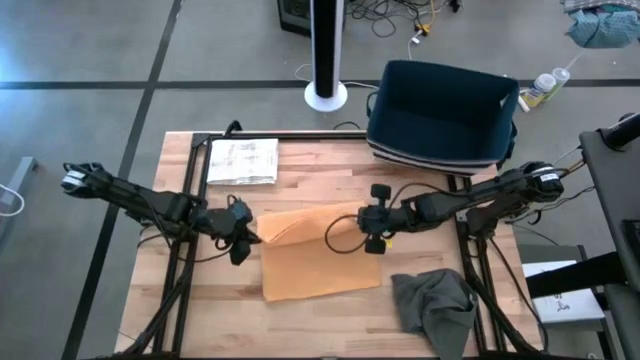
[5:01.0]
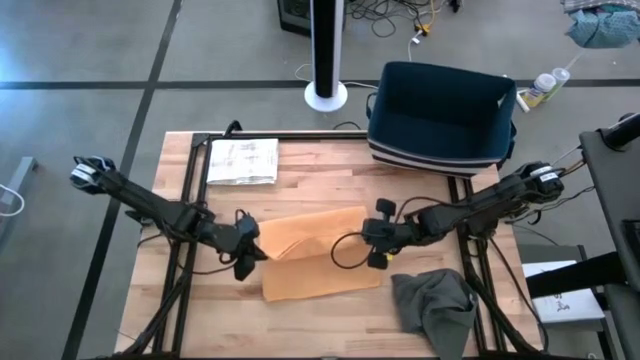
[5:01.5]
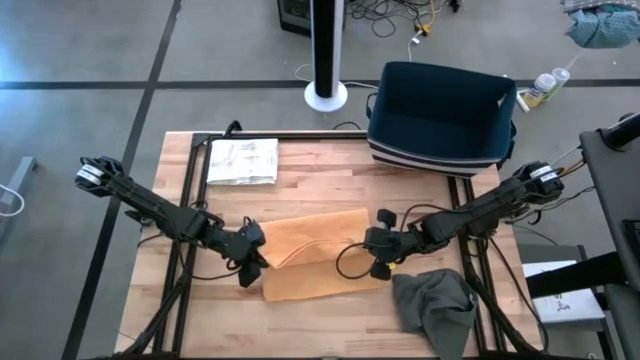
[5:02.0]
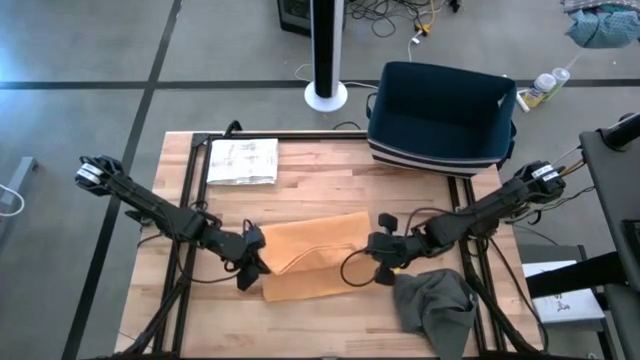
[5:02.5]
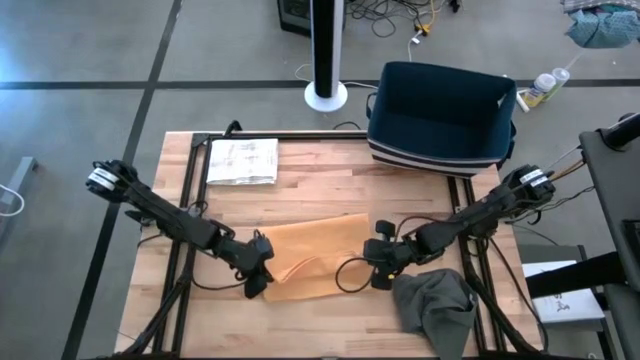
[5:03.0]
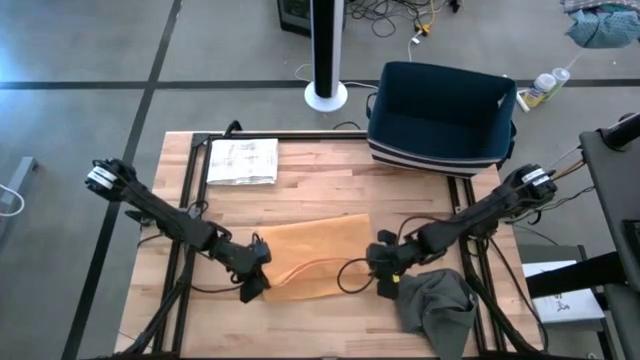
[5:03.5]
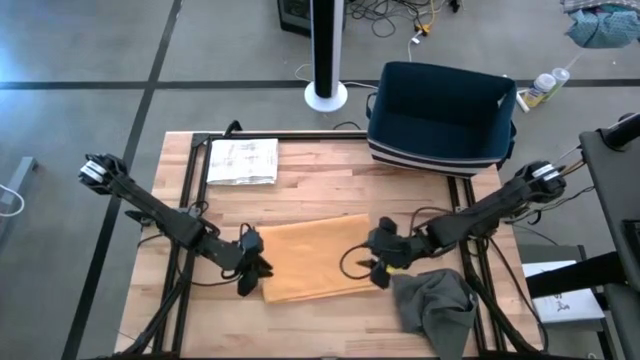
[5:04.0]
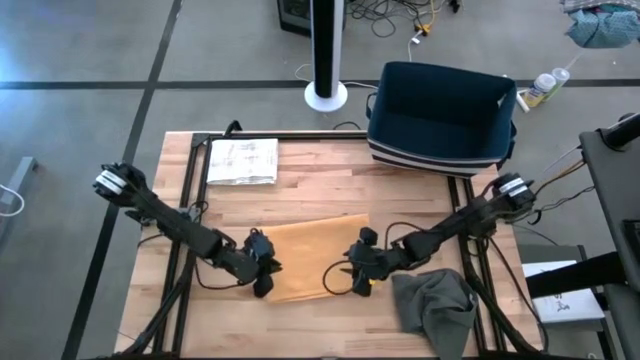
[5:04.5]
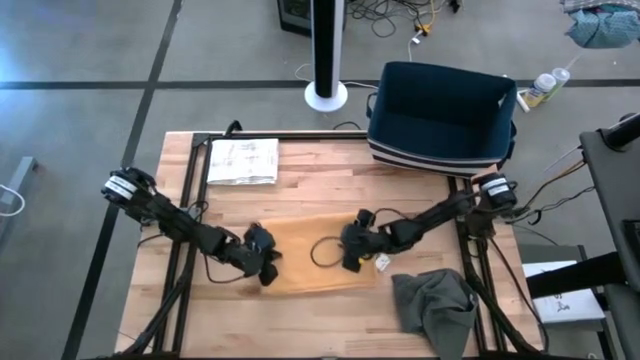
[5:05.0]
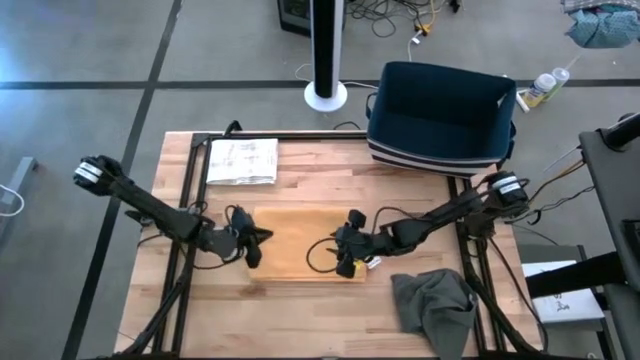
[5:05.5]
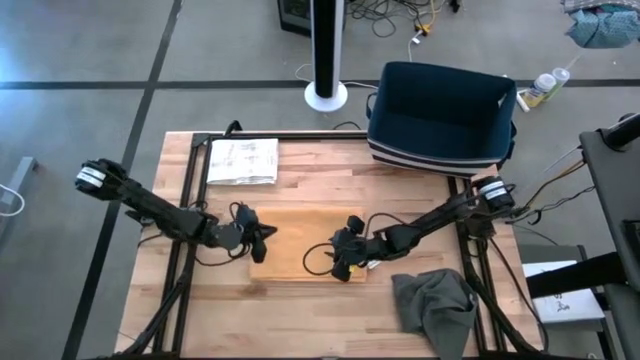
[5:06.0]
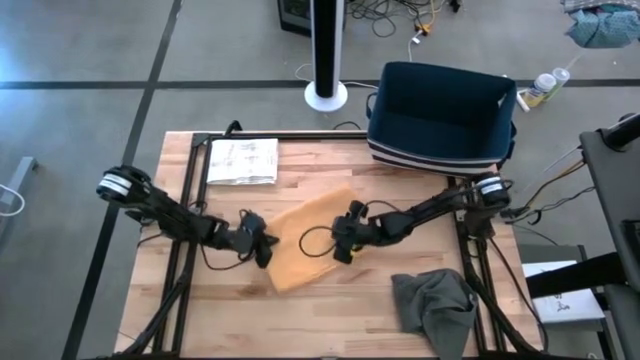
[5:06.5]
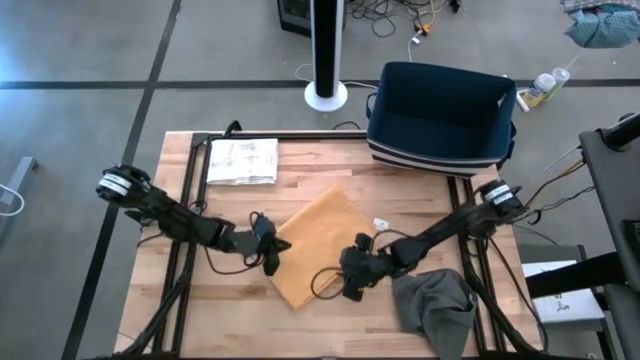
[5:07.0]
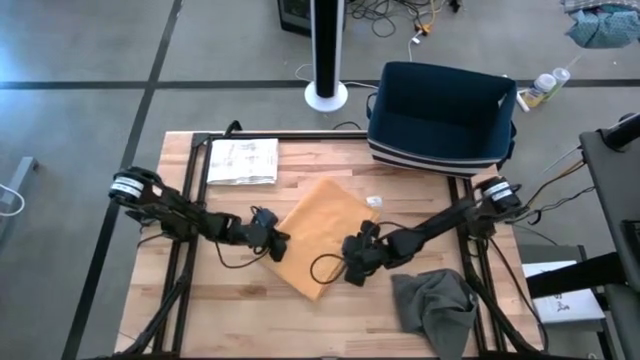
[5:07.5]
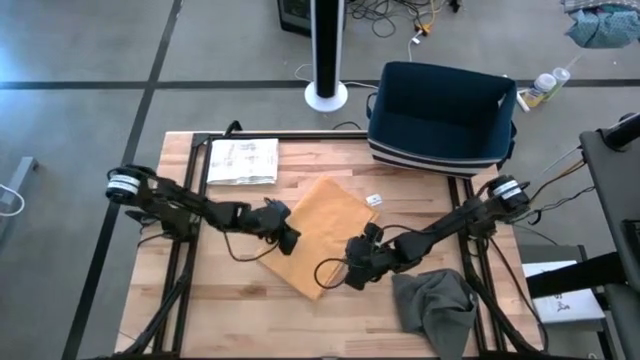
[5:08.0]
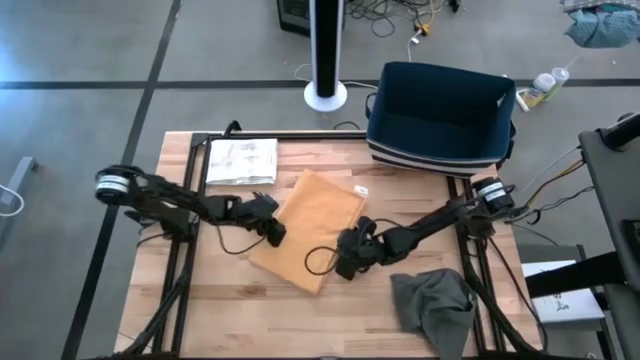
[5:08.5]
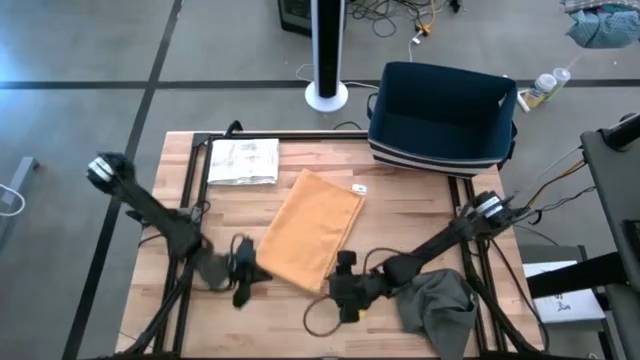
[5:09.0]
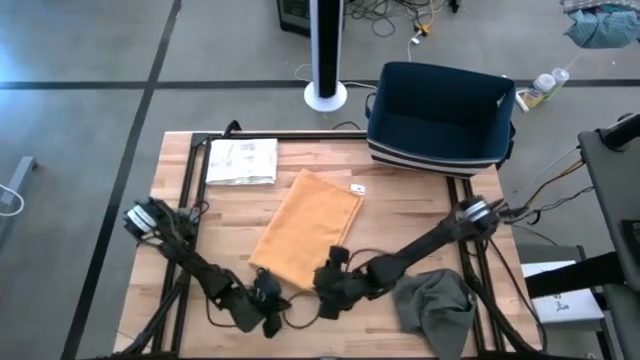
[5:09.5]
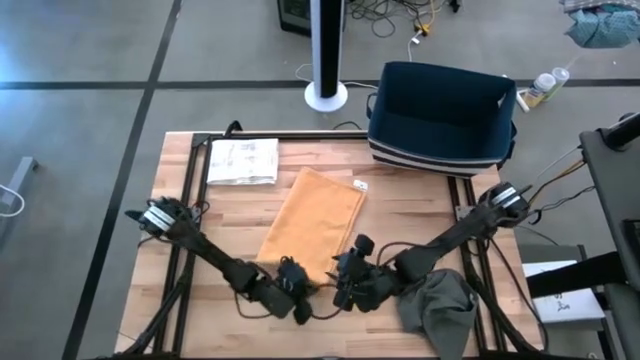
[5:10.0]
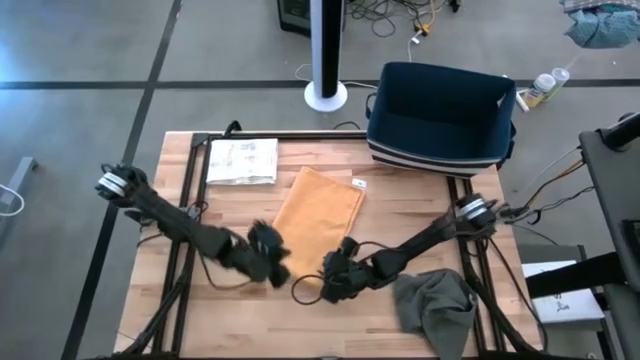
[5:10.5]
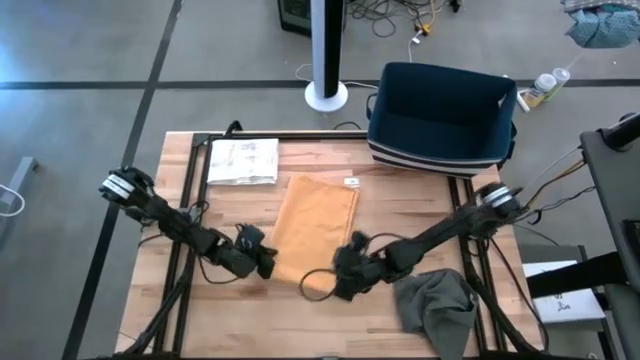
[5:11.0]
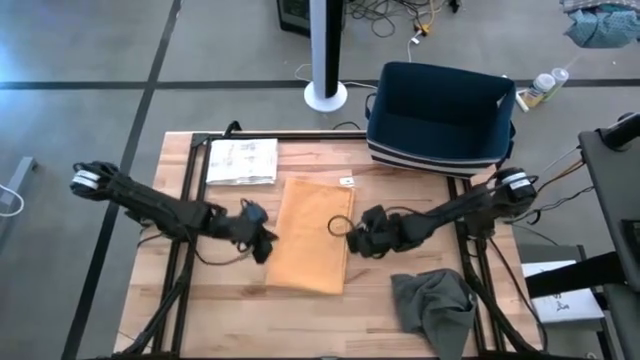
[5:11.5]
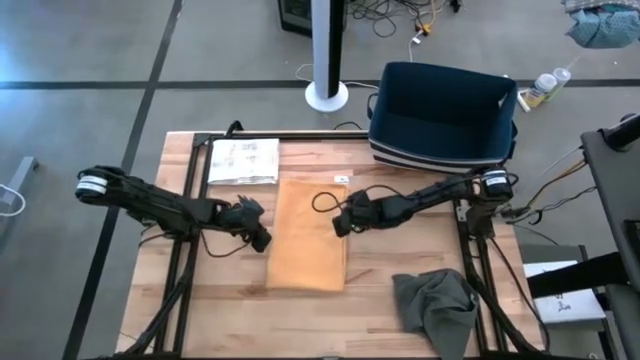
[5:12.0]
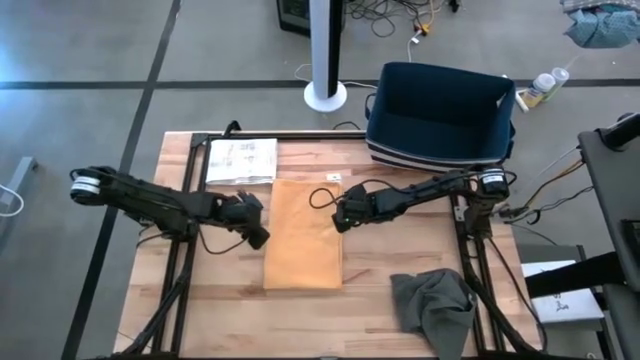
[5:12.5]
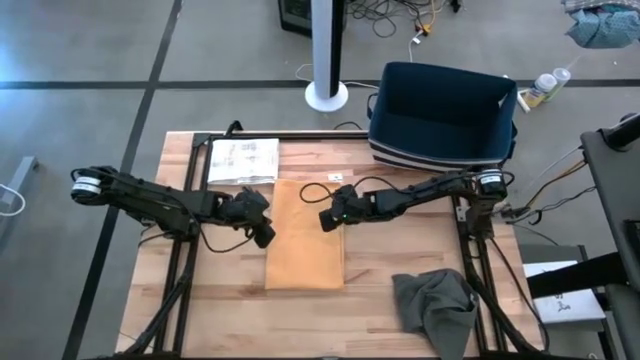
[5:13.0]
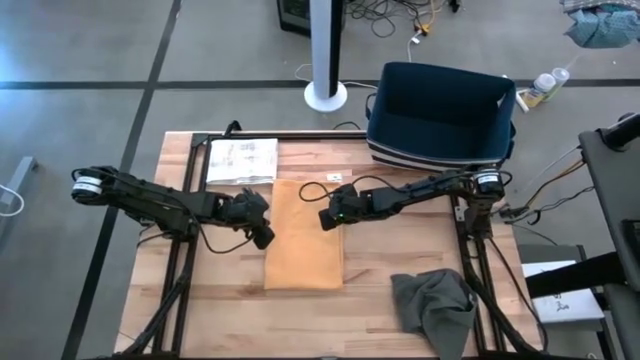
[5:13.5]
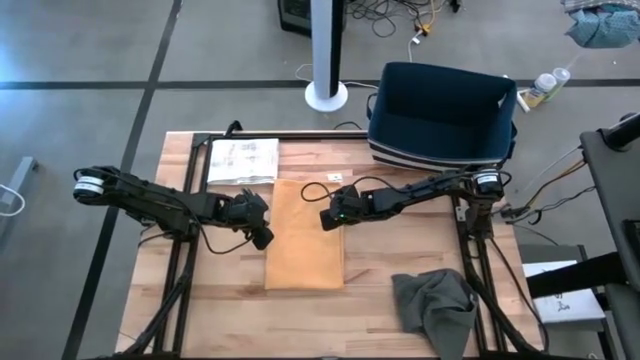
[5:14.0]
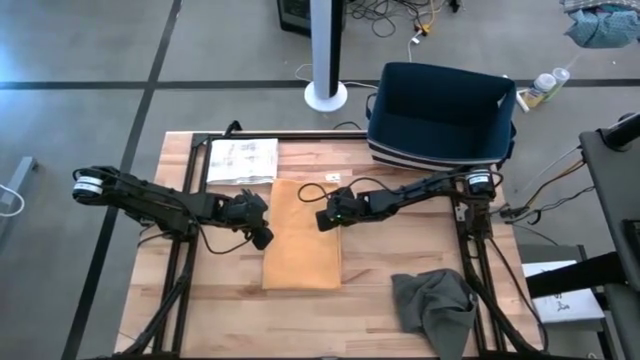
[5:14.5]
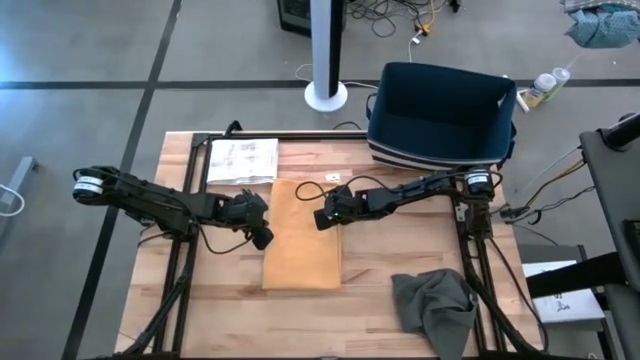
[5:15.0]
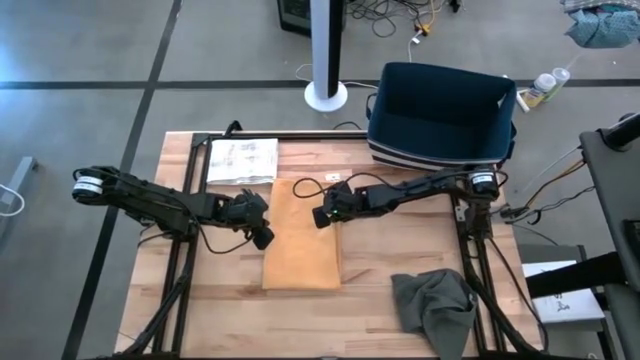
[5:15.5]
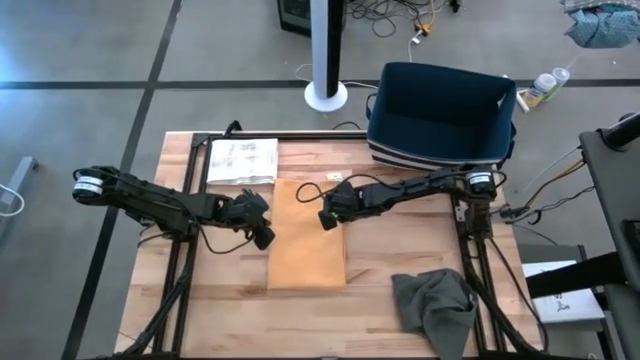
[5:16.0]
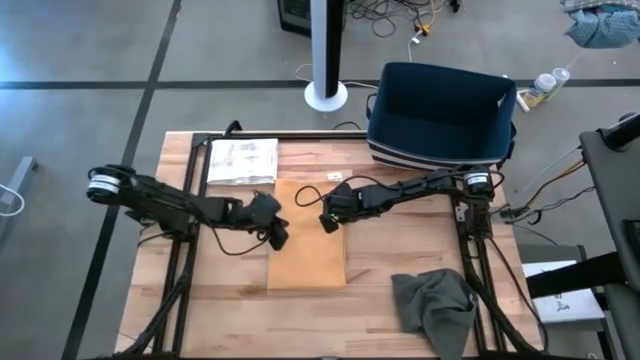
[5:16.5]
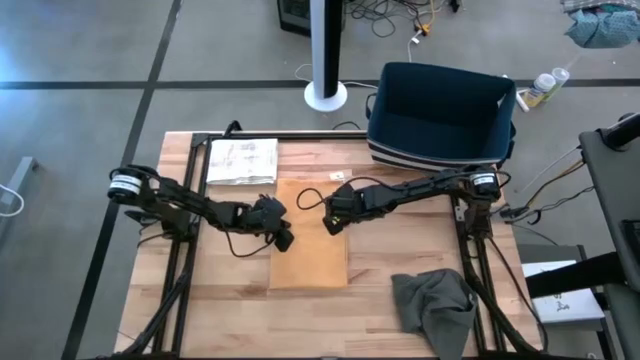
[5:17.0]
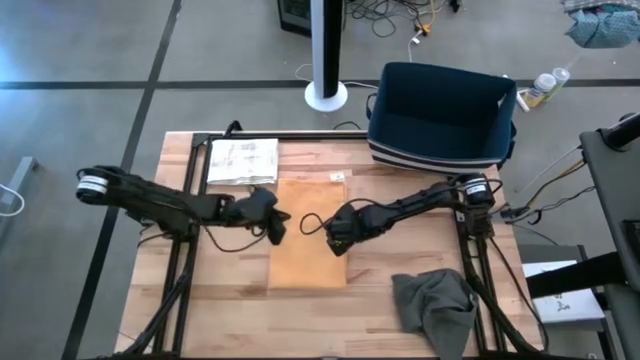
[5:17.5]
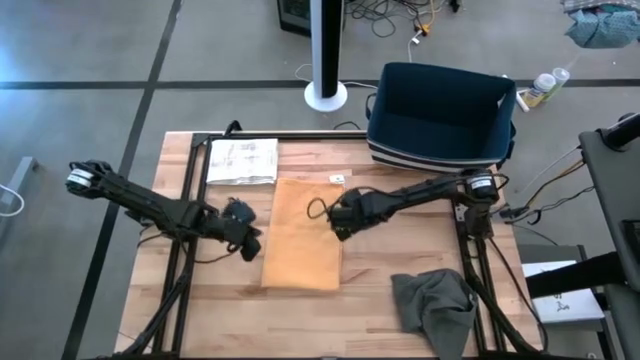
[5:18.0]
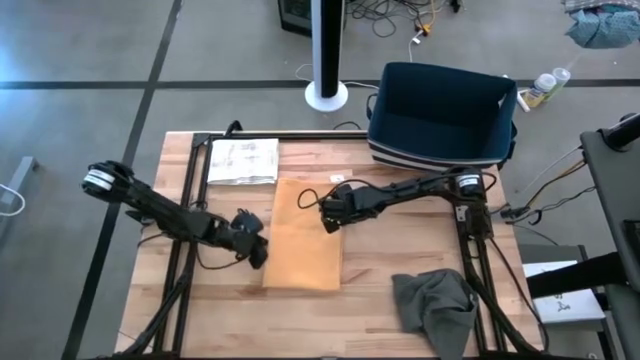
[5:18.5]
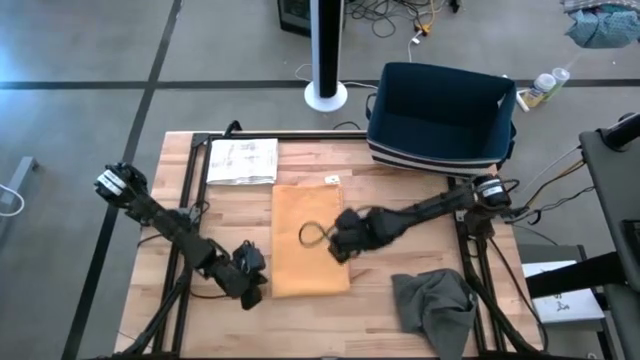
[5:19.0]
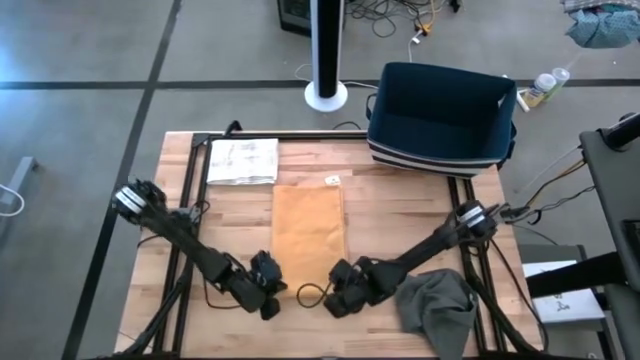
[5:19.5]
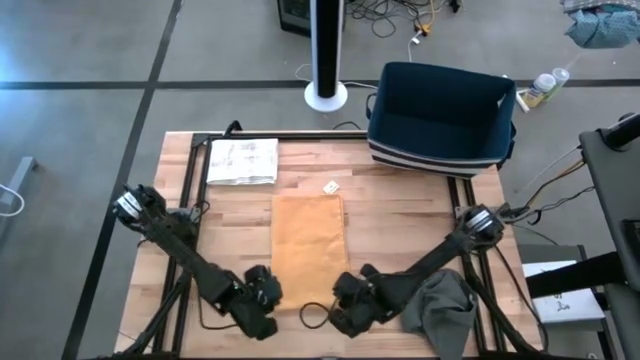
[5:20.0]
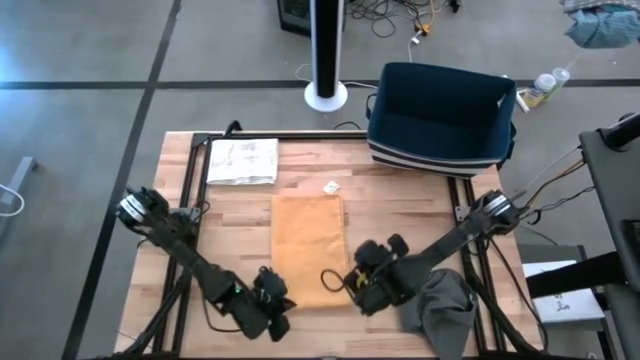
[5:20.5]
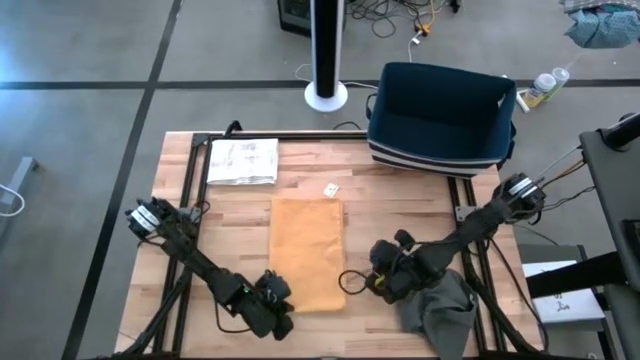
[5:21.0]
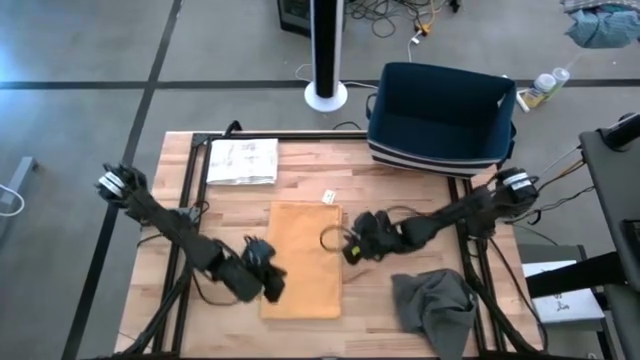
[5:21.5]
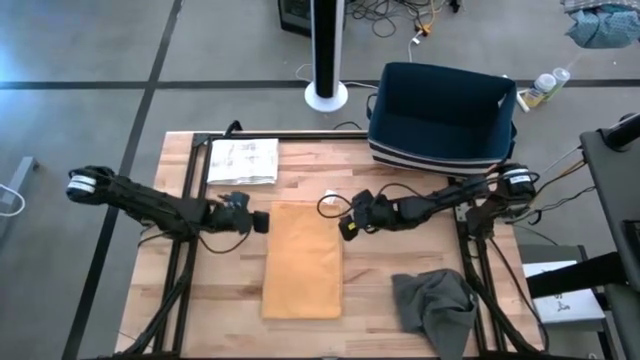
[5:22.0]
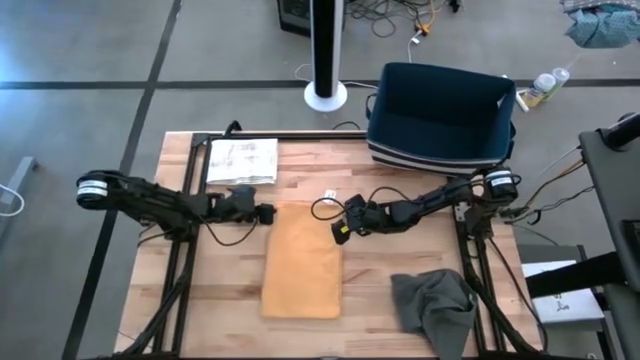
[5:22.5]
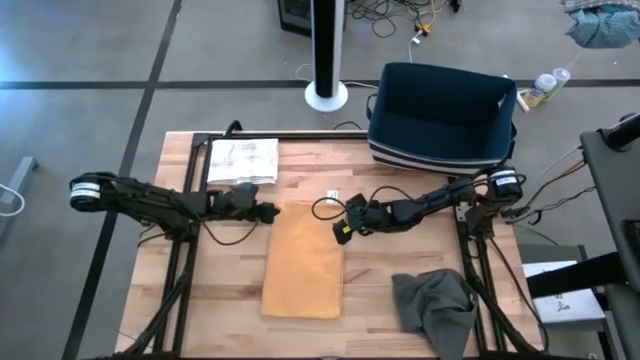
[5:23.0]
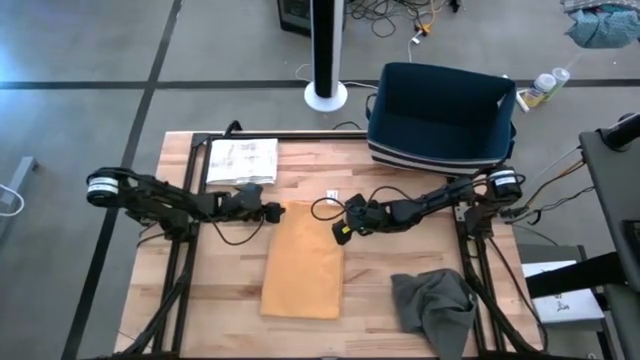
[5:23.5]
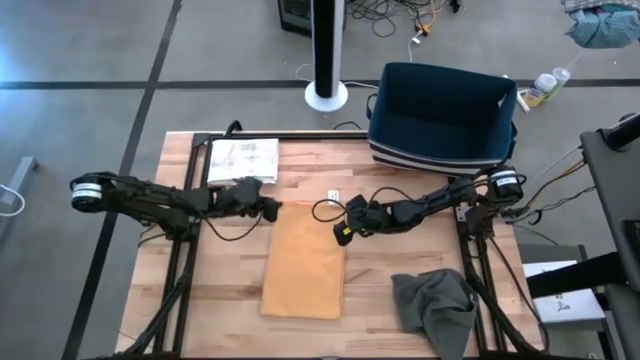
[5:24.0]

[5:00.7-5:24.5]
Task: Fold towel
Fold the yellow towel
